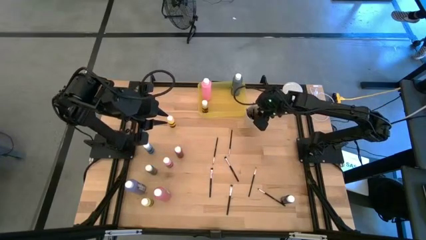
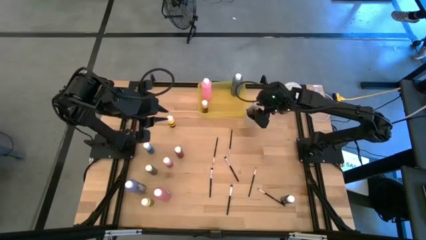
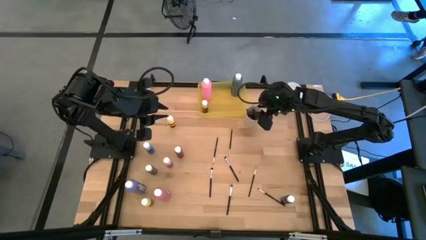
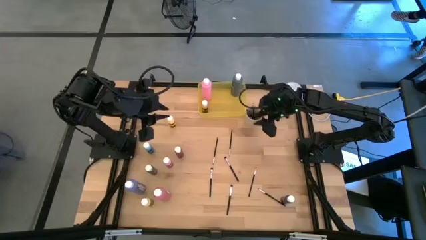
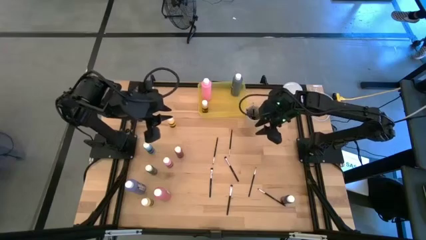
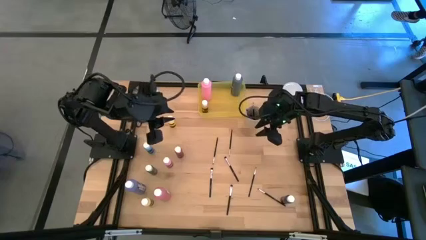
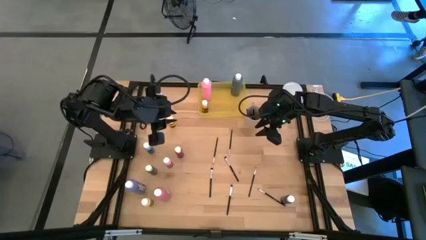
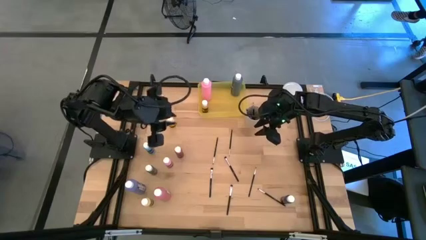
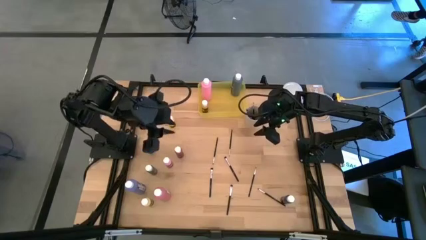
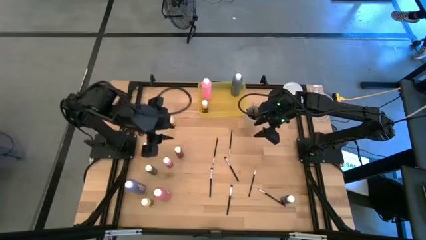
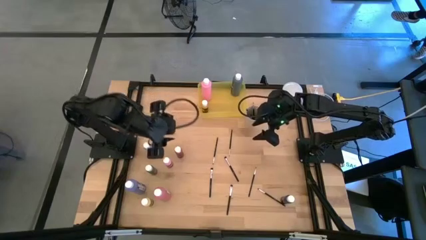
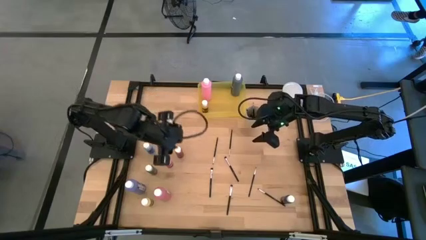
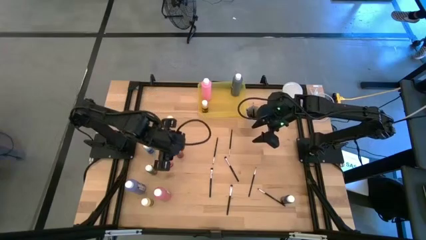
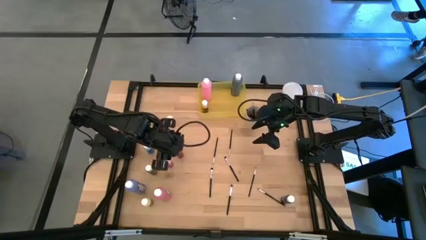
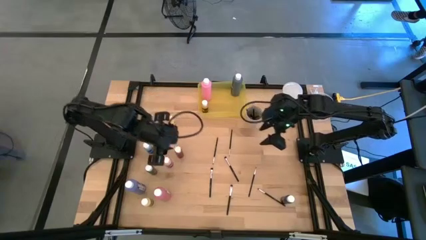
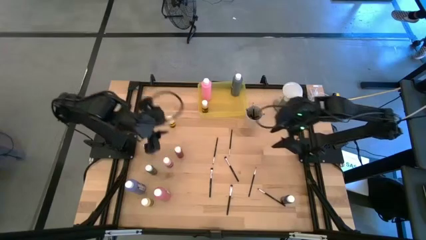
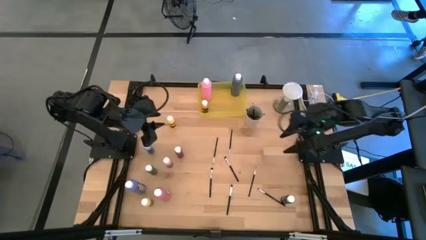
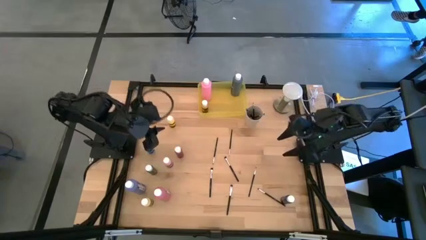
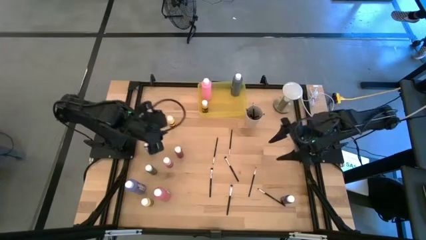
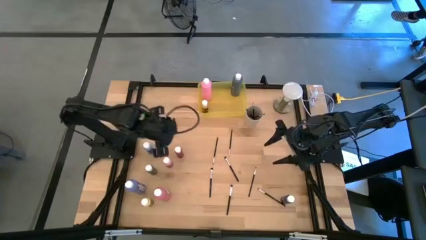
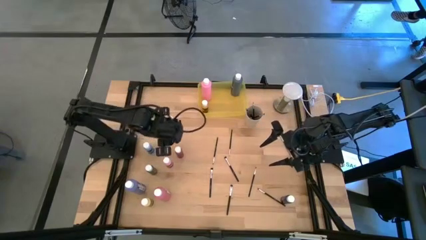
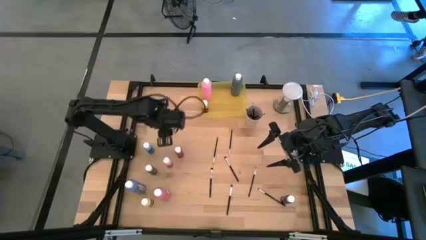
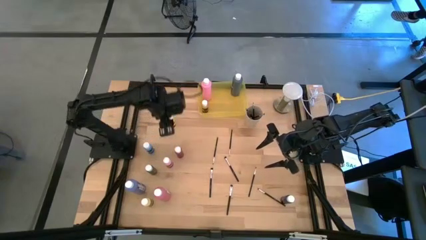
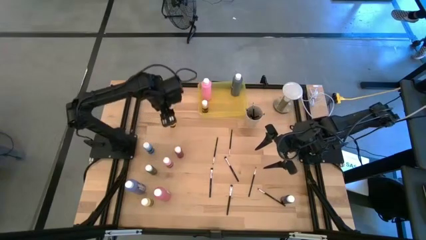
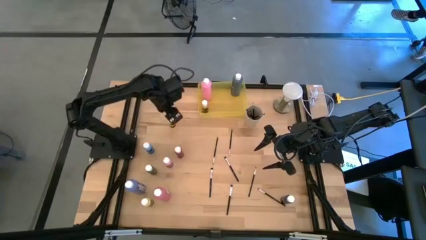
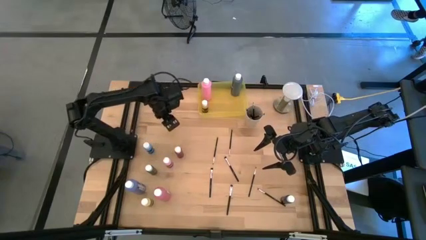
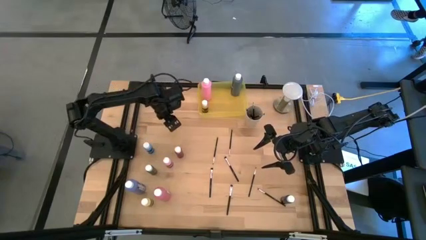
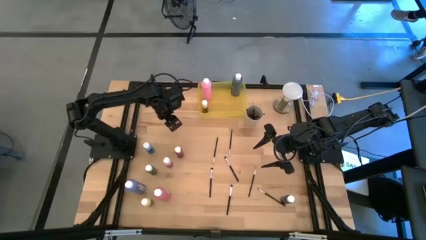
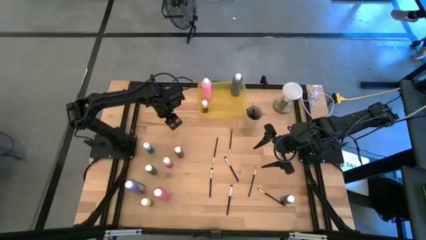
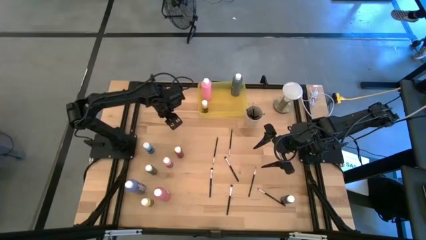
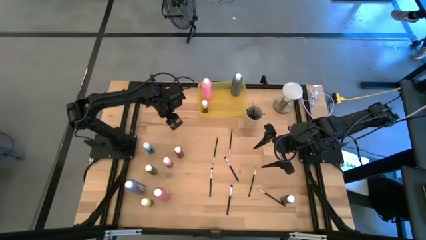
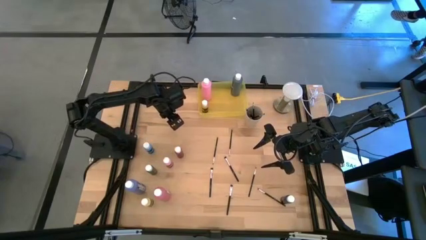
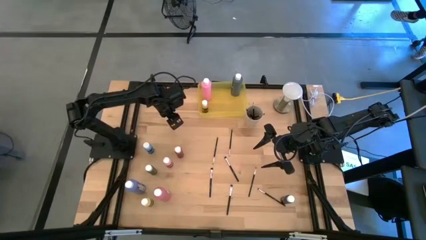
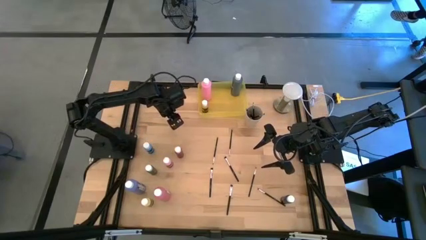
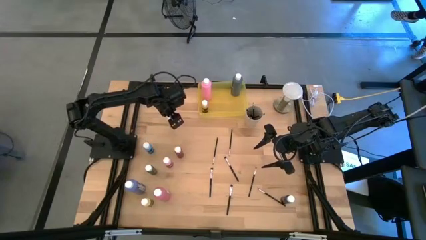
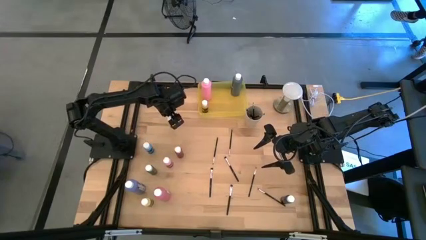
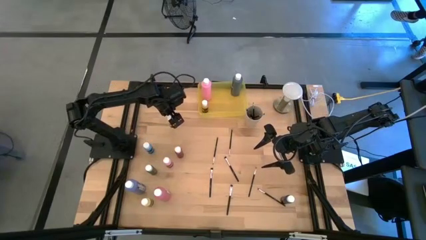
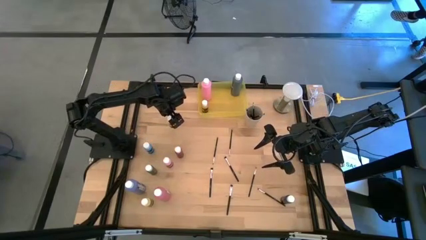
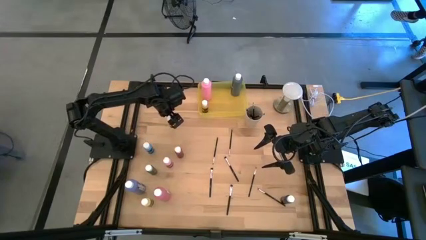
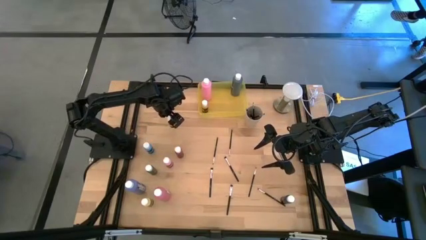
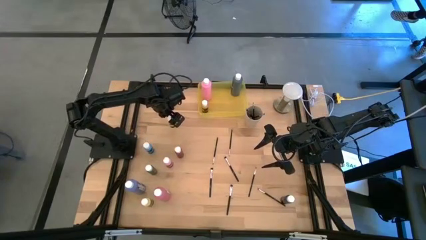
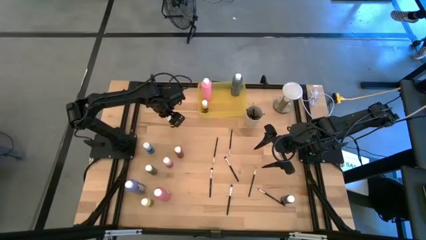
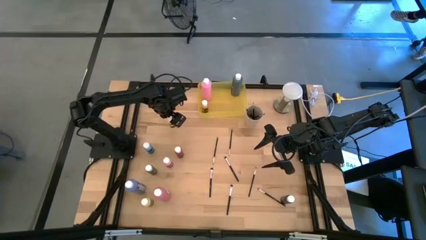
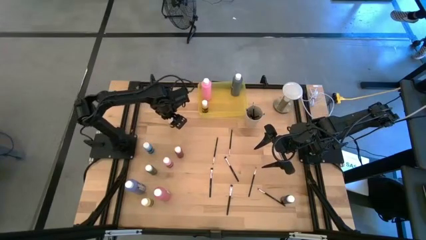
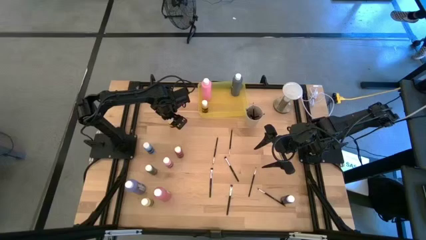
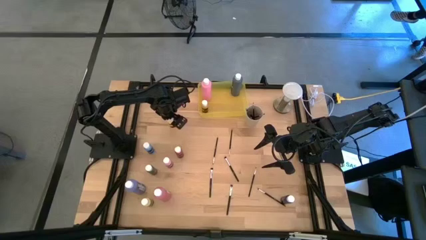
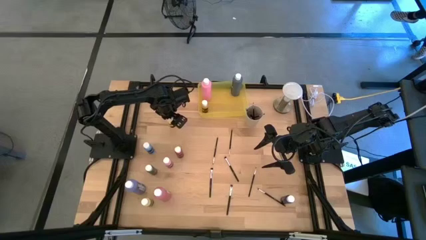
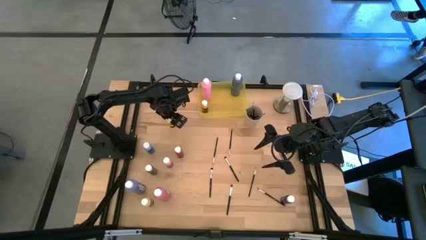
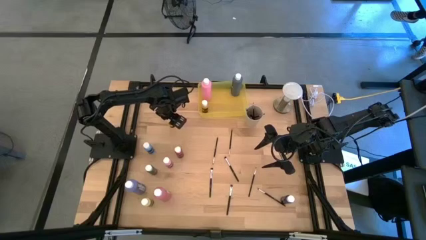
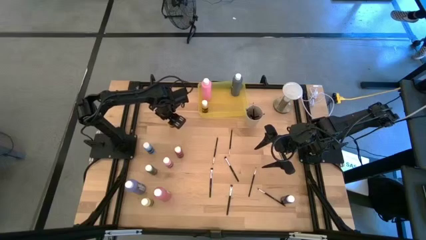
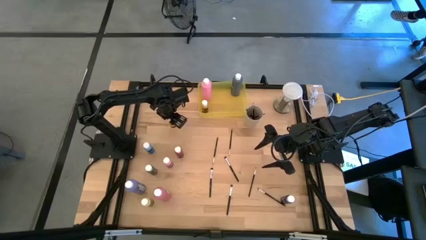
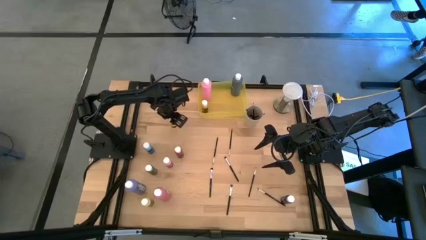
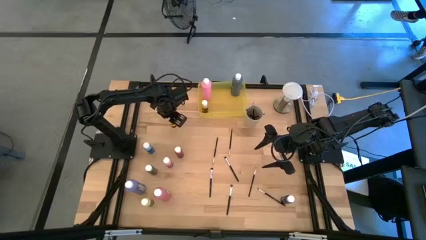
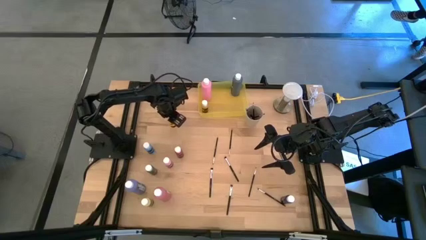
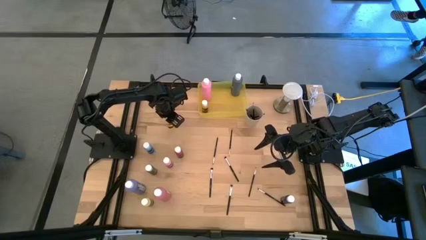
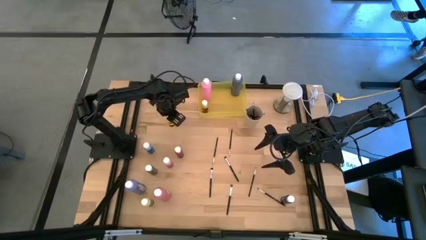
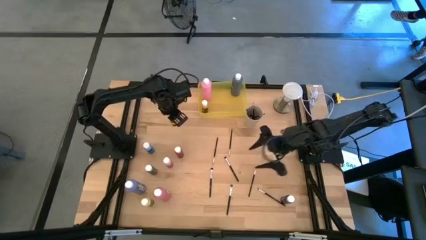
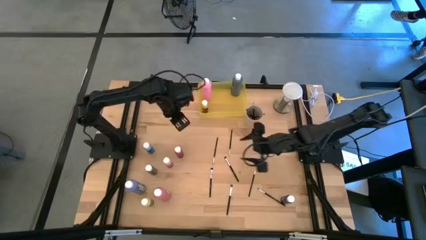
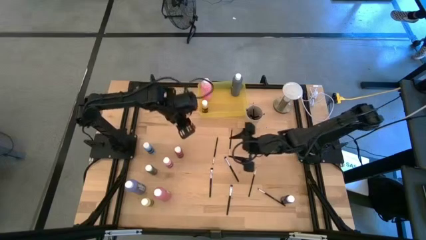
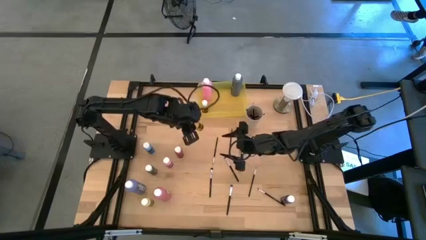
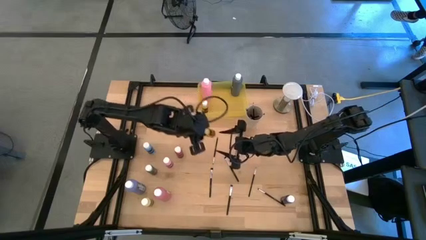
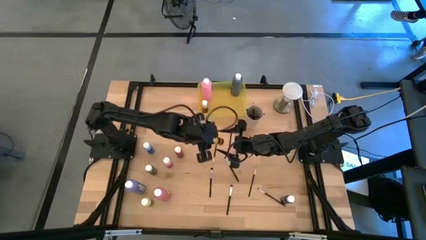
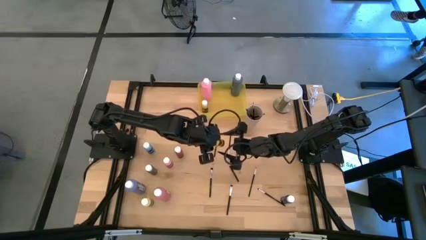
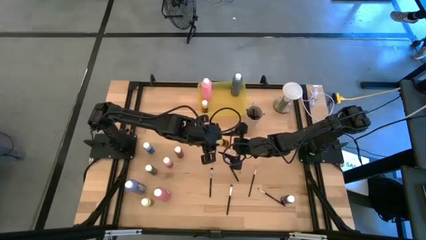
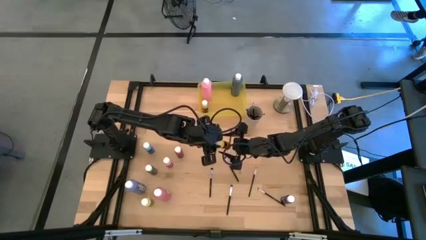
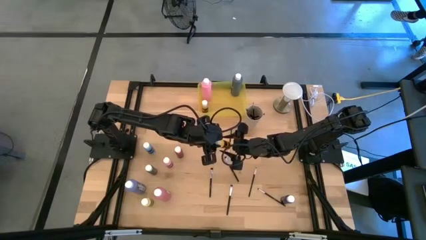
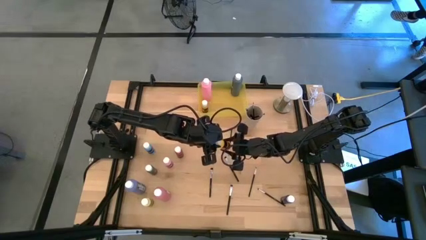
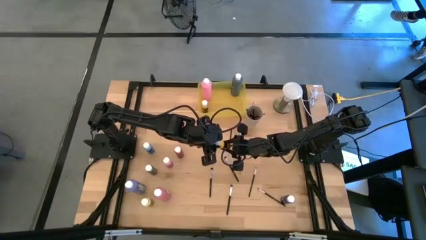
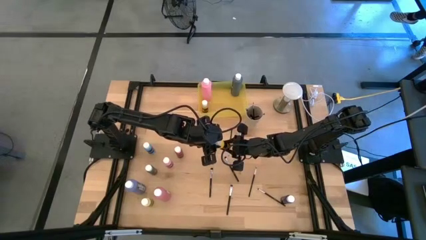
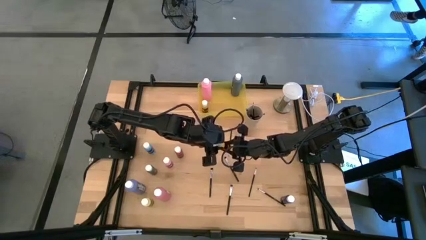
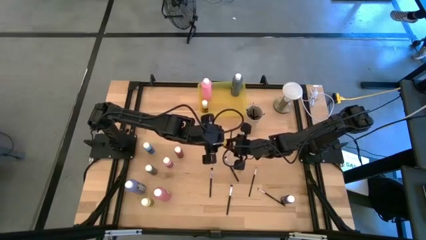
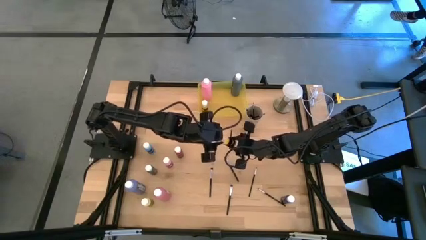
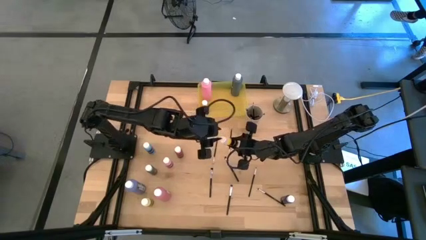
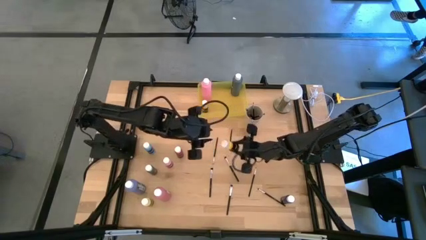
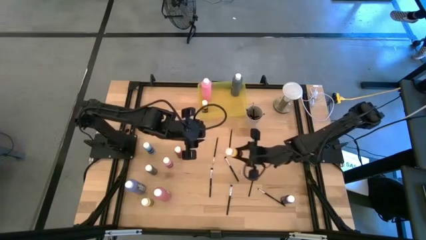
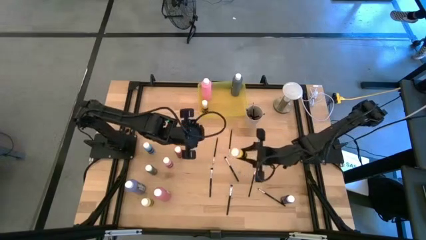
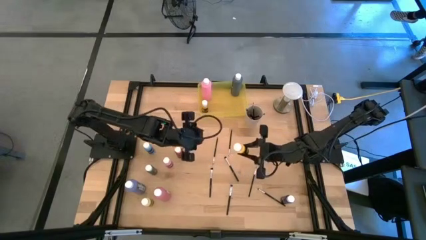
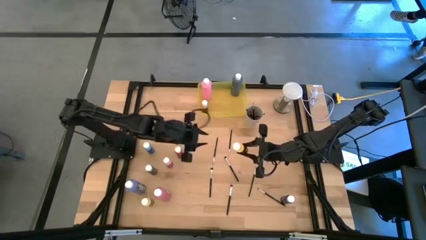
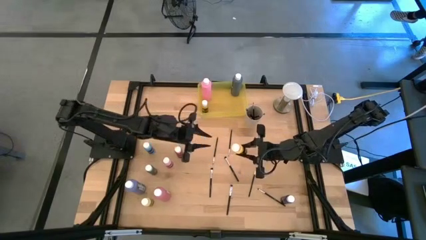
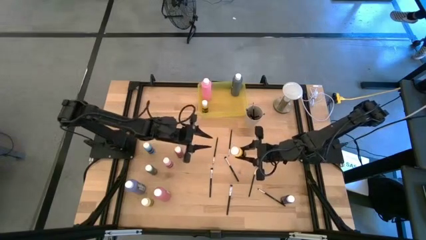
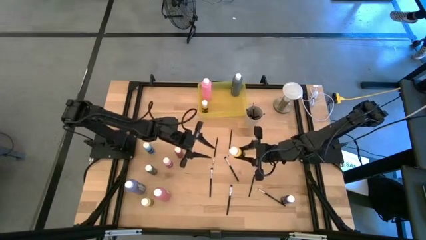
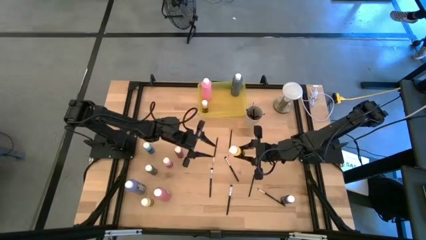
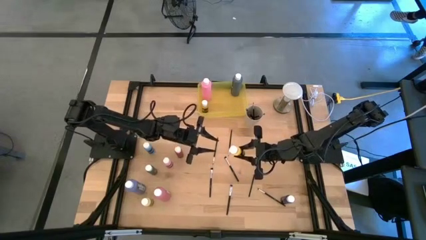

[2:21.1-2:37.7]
Task: Pick & Place Paint Supplies
Put the small yellow paint bottle into the yellow bin
